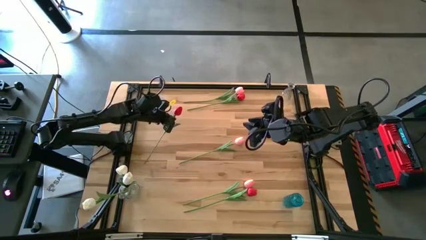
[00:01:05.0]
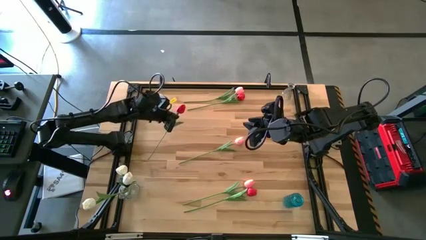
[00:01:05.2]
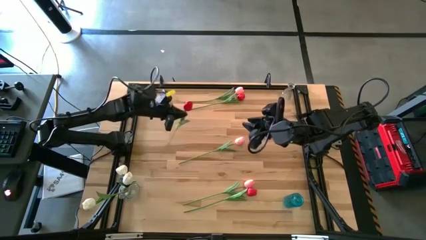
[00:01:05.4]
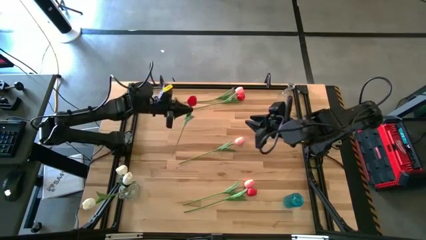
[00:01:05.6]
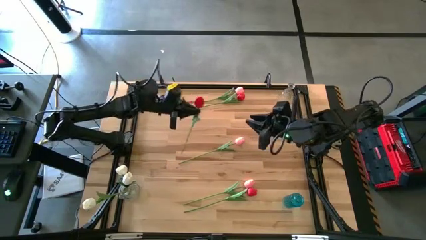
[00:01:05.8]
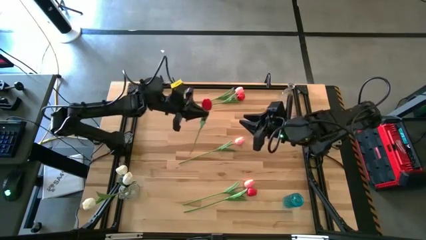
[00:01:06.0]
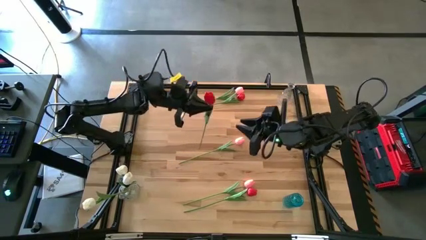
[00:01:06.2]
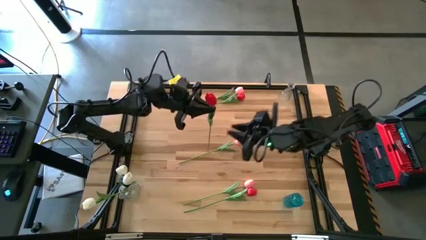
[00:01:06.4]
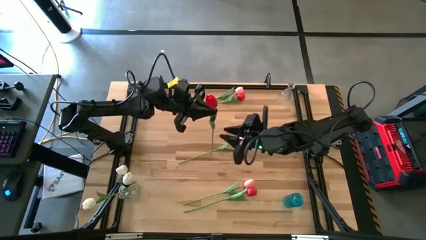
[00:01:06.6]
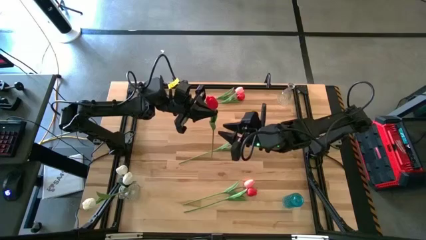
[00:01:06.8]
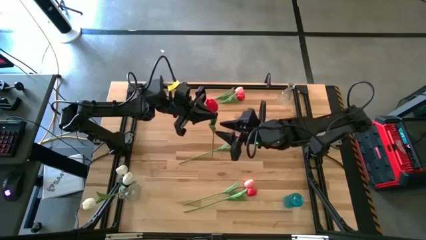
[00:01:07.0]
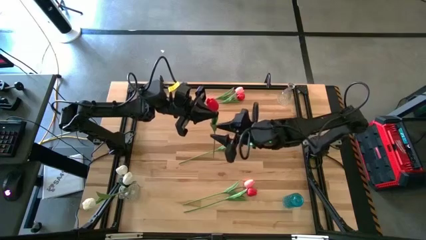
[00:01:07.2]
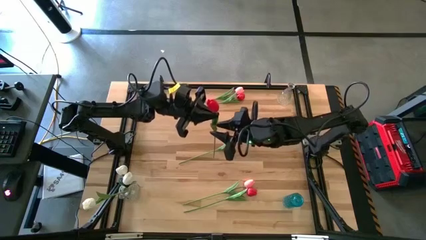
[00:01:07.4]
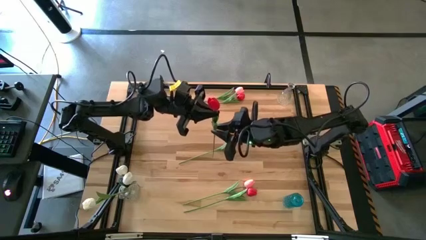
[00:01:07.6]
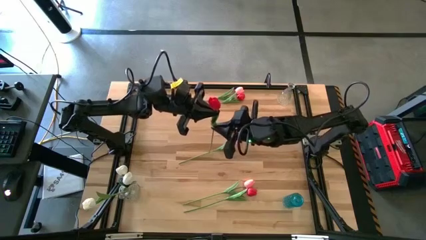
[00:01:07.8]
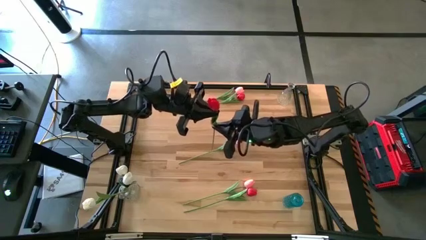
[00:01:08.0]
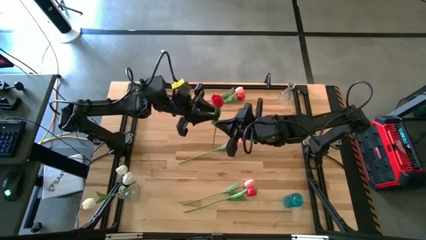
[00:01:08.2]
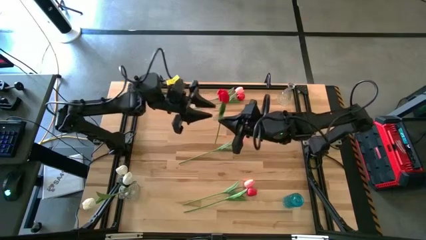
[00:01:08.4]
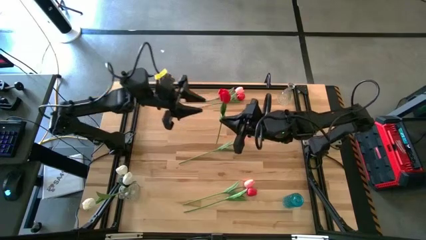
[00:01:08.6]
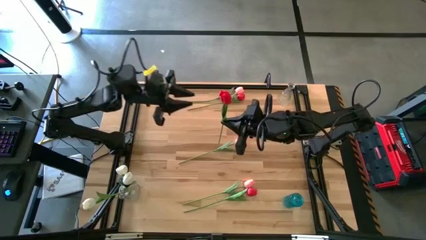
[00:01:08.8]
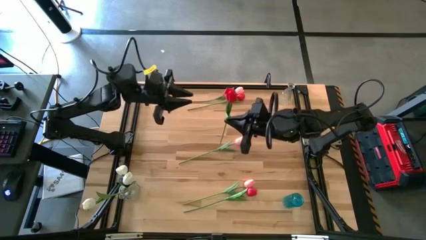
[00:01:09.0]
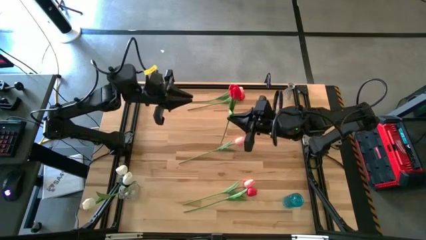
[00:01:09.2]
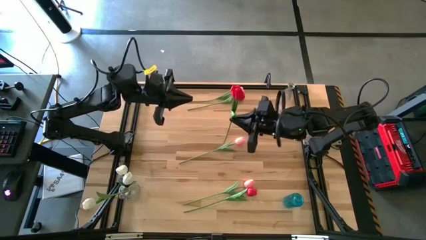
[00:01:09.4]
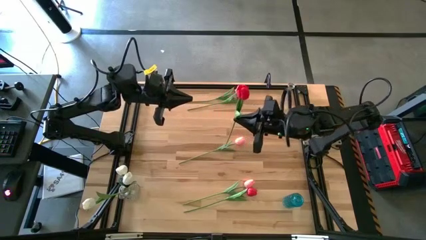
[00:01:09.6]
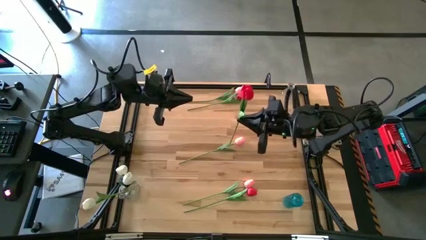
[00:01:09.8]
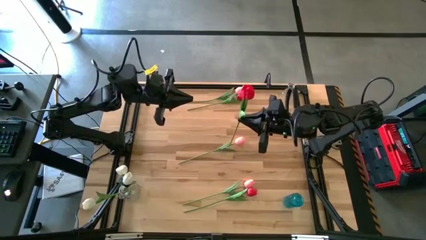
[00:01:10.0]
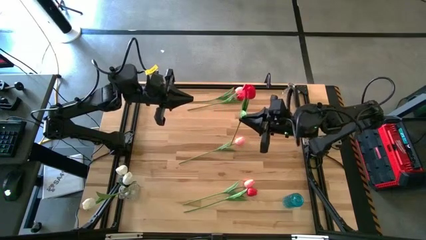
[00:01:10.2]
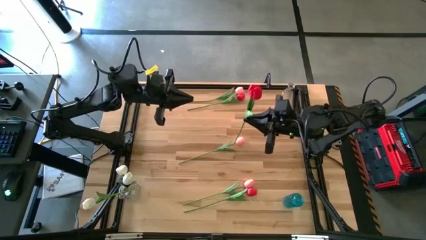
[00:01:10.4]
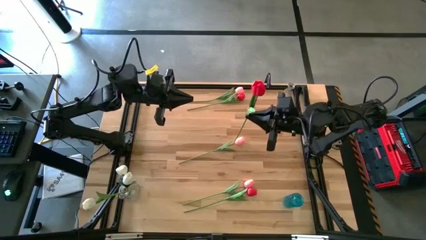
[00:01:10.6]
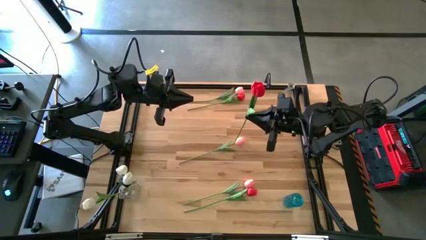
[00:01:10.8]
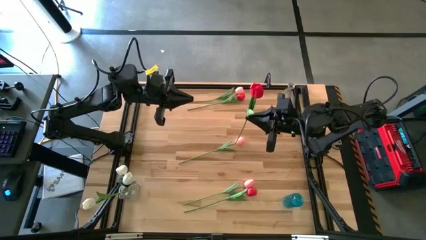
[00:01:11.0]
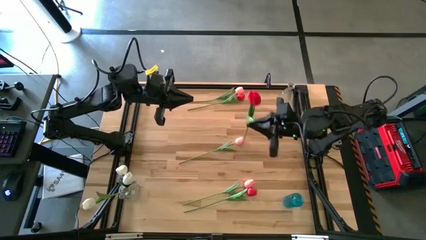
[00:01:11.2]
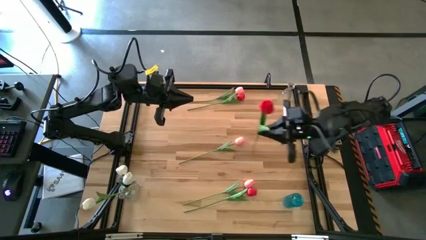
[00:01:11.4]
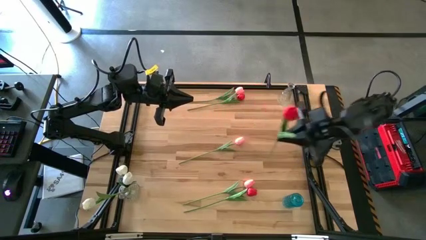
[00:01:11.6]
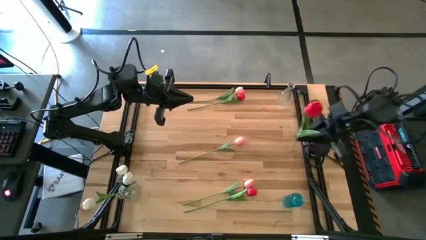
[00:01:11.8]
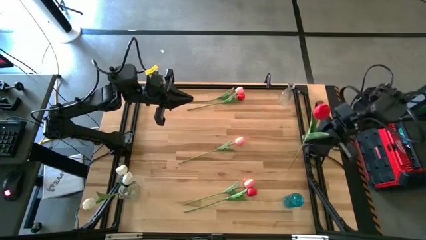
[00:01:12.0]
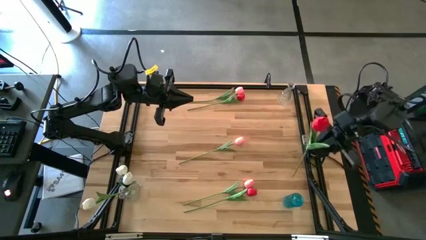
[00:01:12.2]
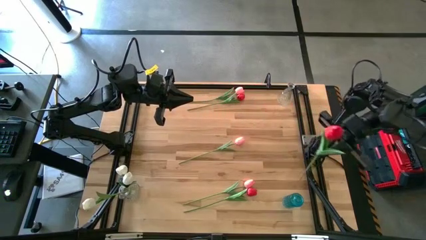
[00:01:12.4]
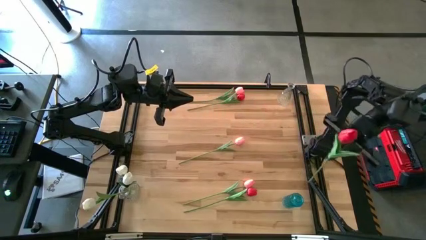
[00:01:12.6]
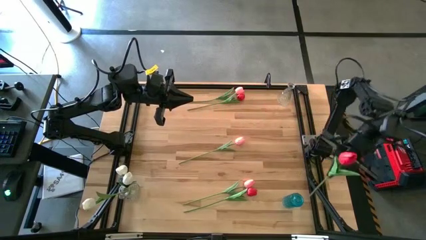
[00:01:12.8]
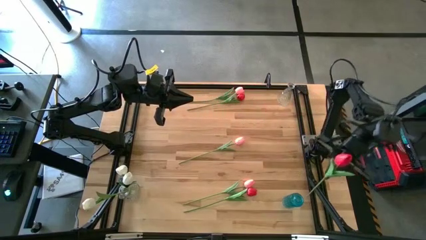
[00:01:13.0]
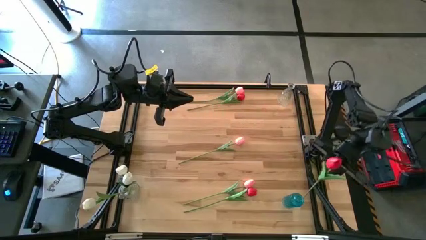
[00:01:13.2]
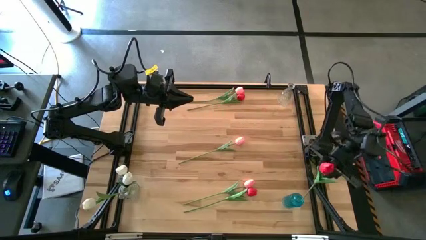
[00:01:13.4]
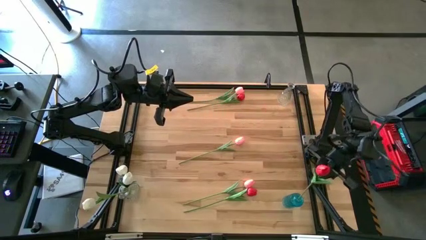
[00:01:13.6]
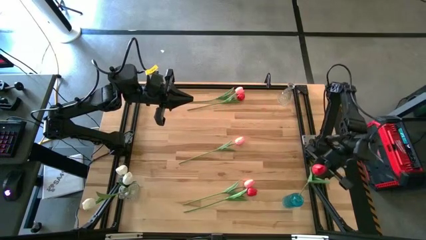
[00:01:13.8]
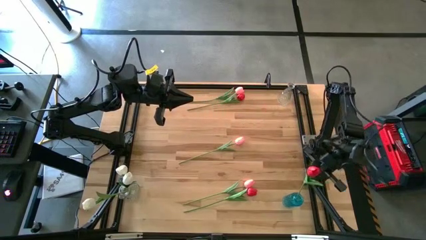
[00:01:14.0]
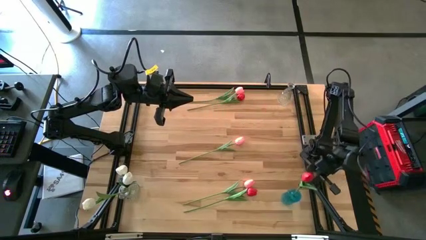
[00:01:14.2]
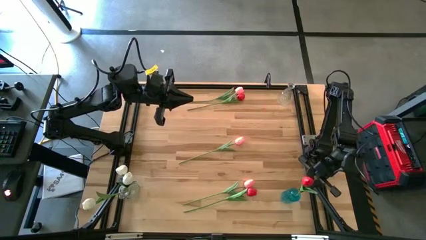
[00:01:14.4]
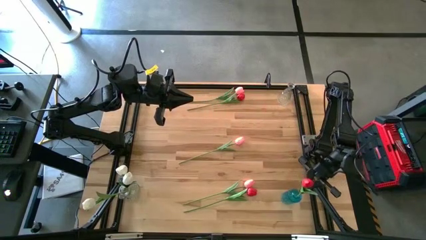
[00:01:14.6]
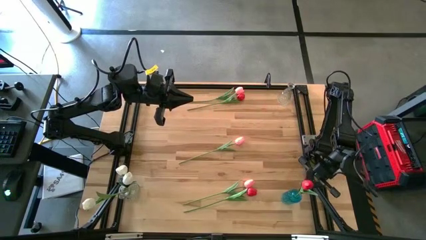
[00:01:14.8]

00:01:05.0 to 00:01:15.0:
Task: Sort flowers into vase by color
Put the middle red flower into the blue vase

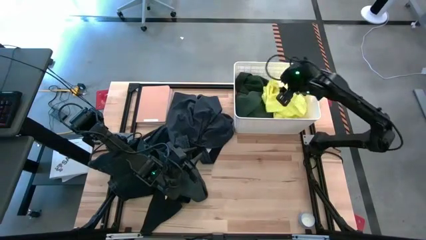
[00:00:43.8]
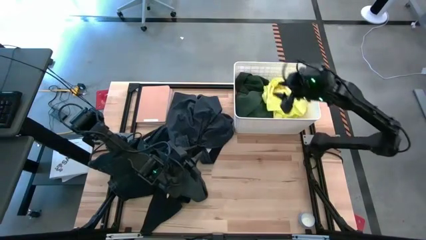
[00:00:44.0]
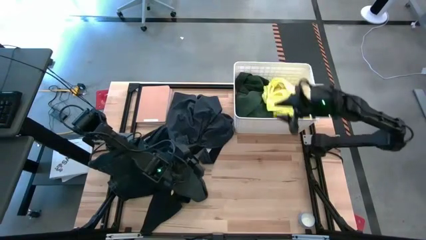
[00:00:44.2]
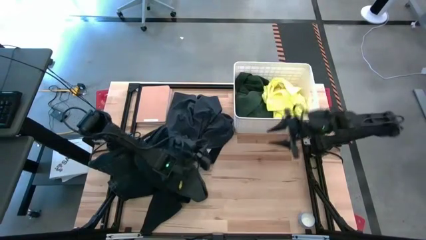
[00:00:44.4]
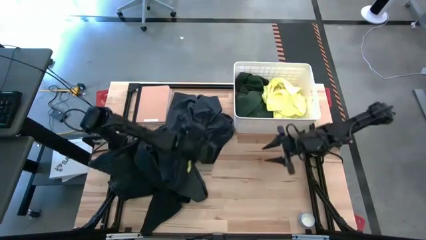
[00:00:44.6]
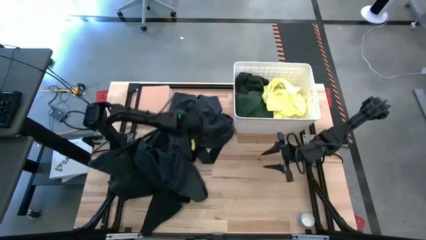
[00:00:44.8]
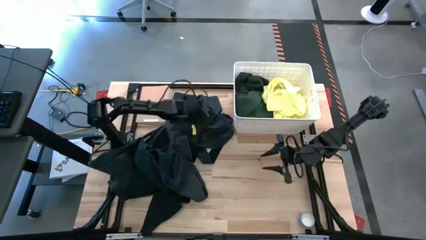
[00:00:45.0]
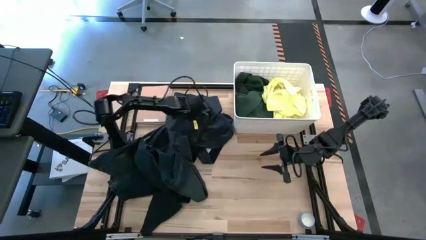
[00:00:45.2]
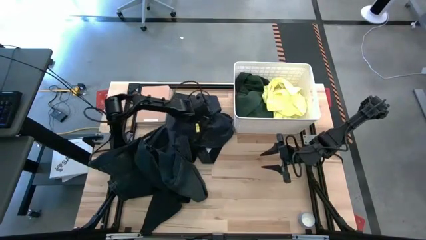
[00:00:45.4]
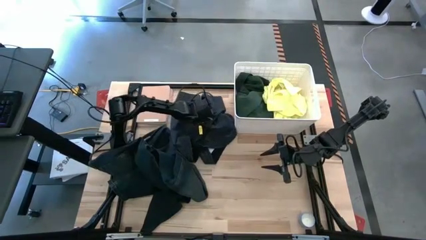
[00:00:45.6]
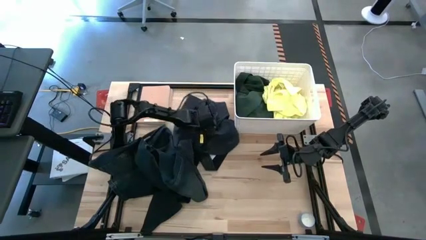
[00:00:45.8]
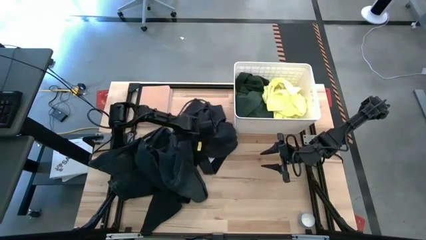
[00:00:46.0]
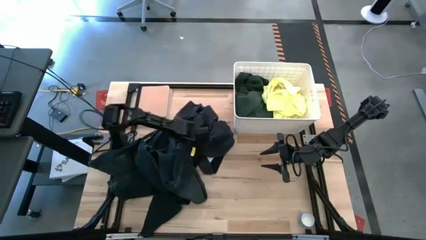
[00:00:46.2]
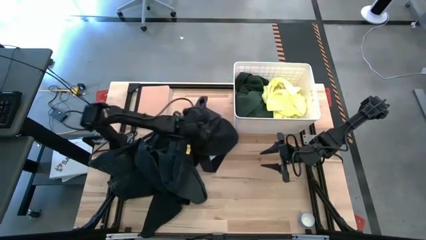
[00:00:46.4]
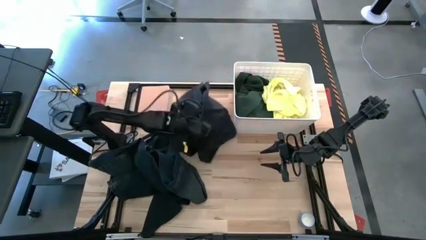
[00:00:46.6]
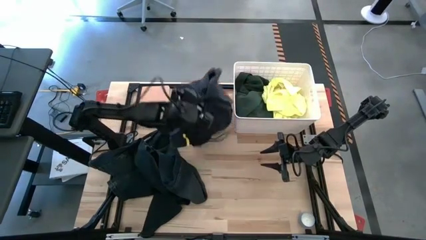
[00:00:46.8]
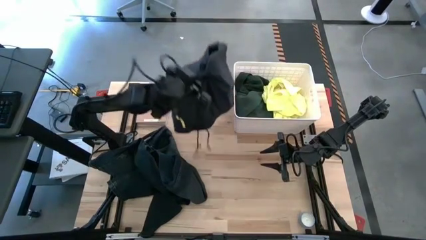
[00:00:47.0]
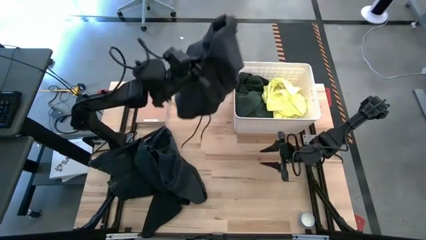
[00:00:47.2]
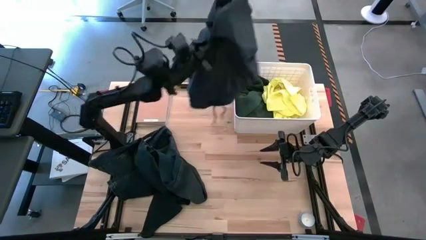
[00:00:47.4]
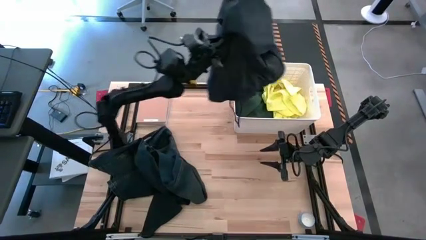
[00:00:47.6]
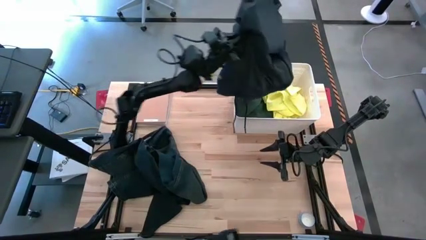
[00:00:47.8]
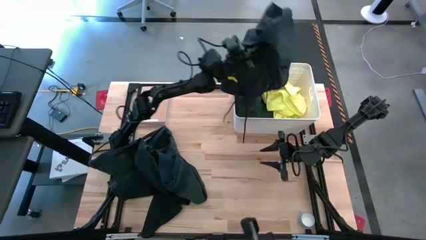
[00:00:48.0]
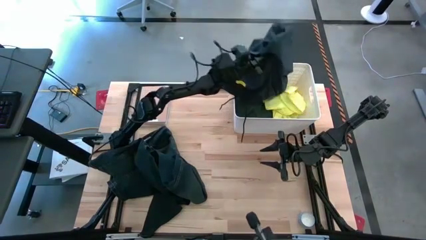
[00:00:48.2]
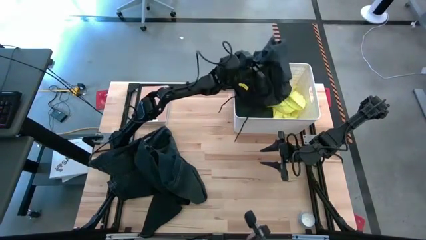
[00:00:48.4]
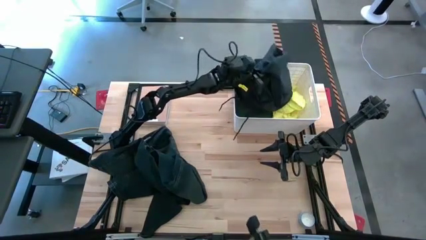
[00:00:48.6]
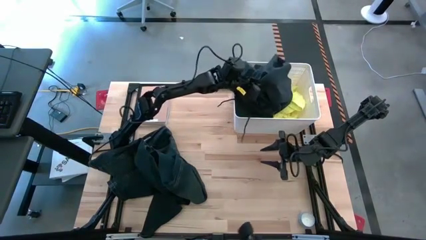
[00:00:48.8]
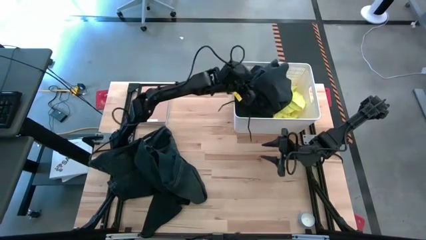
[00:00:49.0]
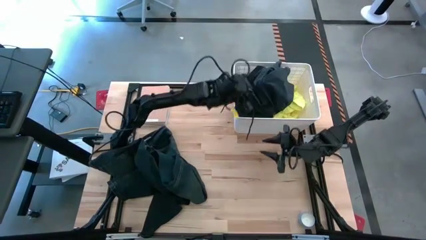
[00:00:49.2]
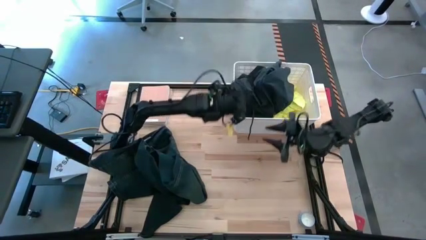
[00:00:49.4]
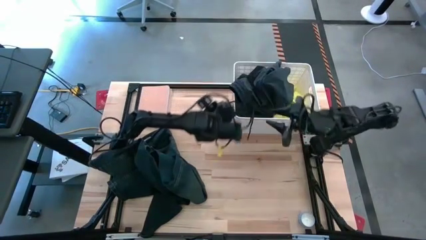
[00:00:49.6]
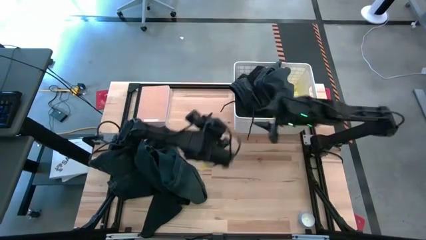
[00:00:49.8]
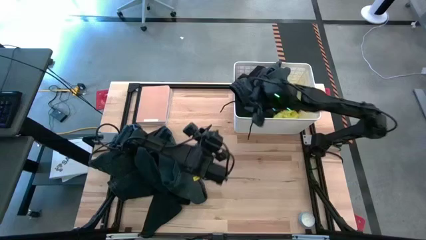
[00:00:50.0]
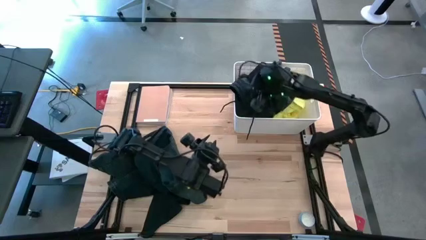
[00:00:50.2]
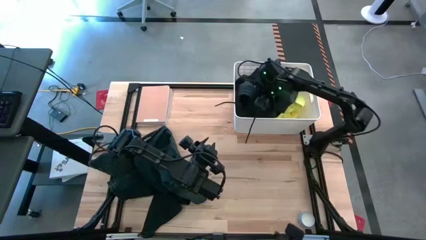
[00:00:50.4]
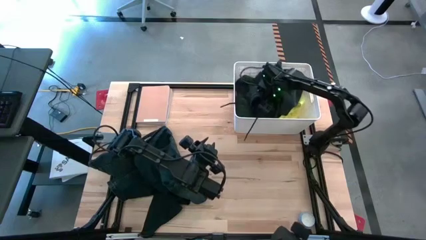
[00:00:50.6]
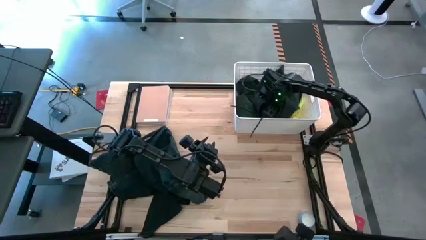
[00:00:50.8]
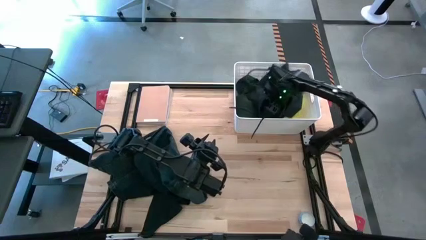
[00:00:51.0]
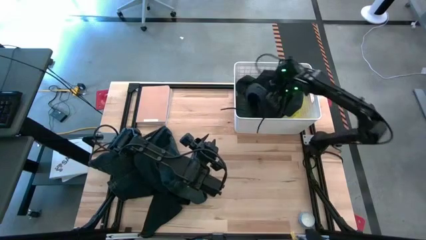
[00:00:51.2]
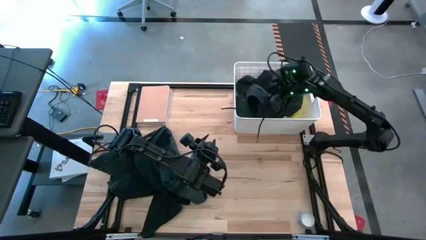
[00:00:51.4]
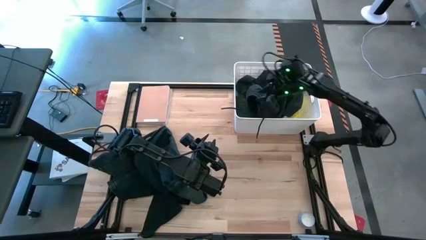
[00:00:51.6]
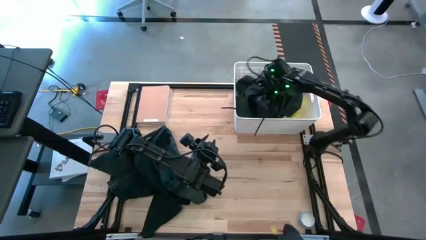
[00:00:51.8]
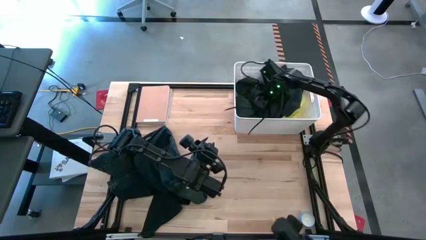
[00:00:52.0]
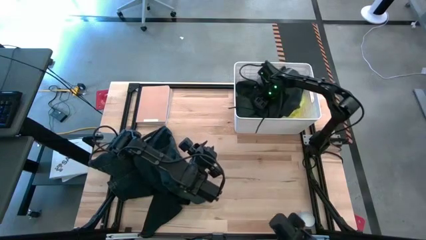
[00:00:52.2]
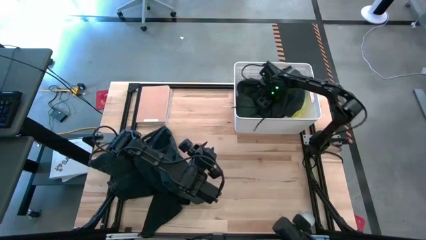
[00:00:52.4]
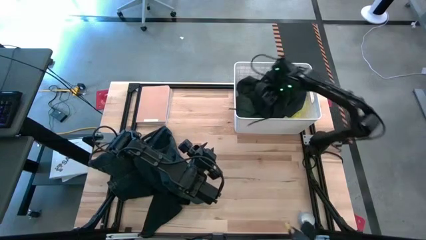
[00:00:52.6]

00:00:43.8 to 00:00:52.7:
Task: Sort clothes
Put the black short pants into the white laundry bin
